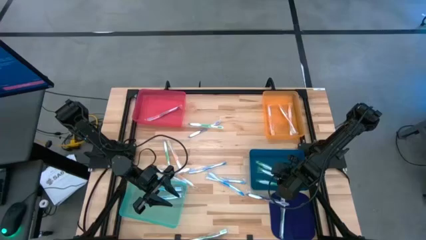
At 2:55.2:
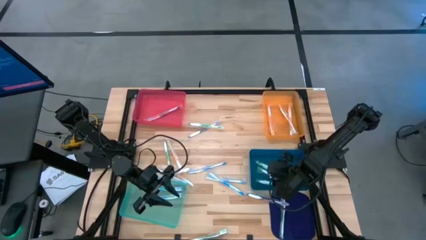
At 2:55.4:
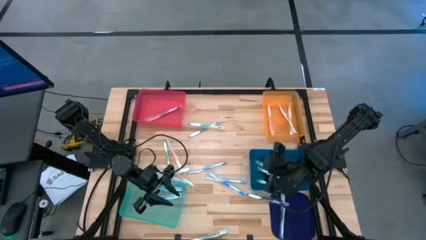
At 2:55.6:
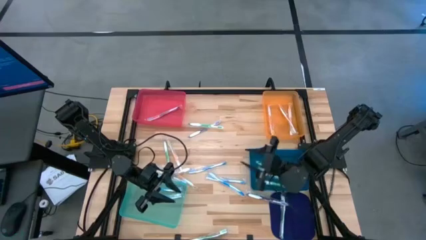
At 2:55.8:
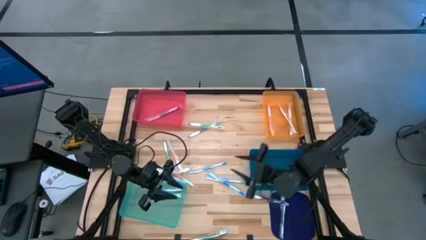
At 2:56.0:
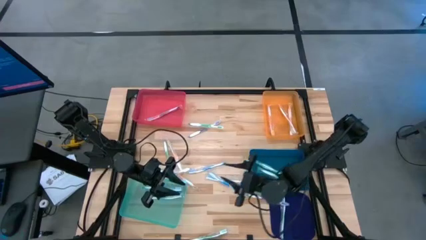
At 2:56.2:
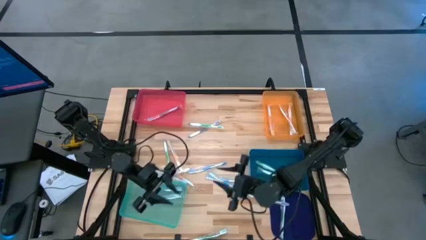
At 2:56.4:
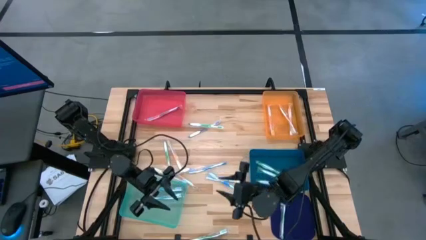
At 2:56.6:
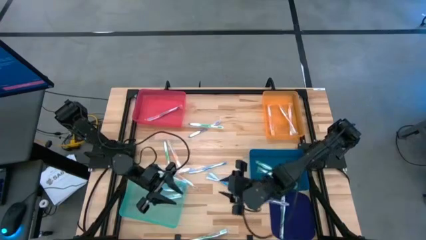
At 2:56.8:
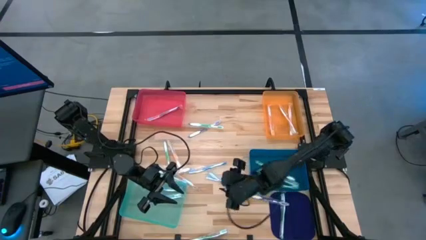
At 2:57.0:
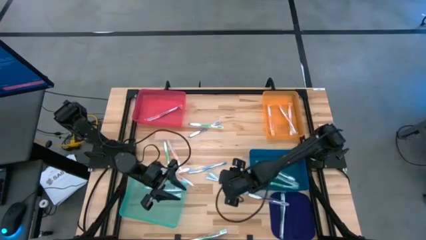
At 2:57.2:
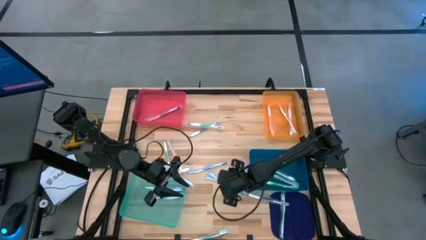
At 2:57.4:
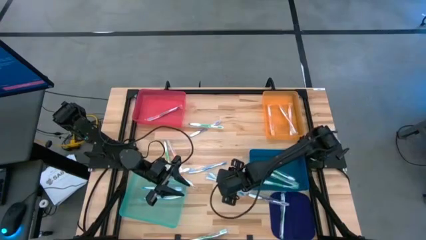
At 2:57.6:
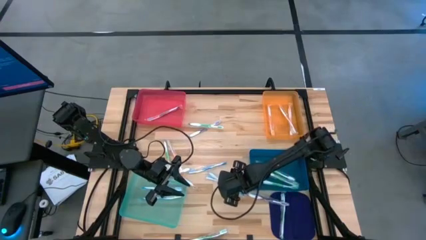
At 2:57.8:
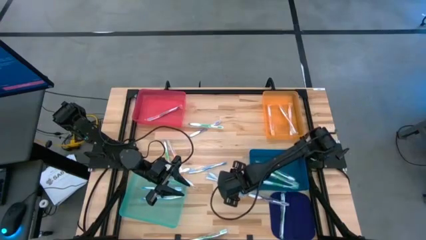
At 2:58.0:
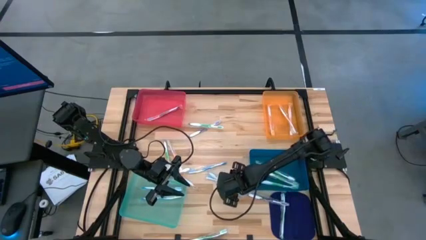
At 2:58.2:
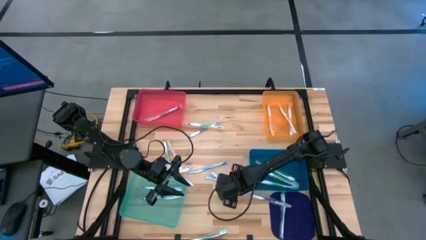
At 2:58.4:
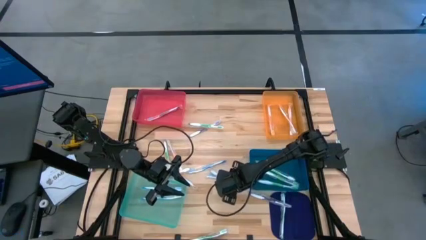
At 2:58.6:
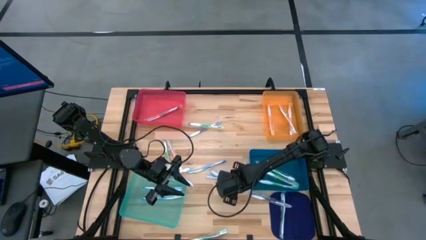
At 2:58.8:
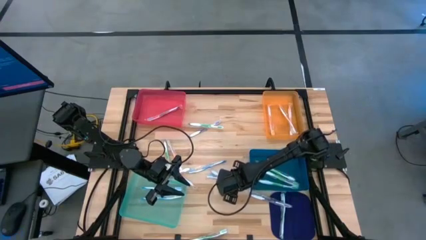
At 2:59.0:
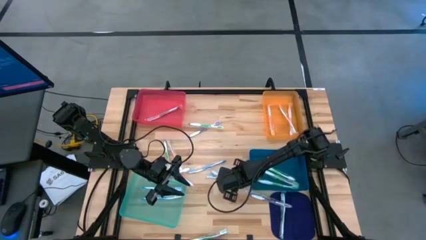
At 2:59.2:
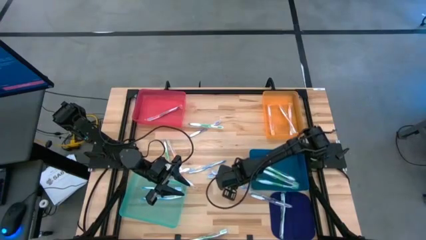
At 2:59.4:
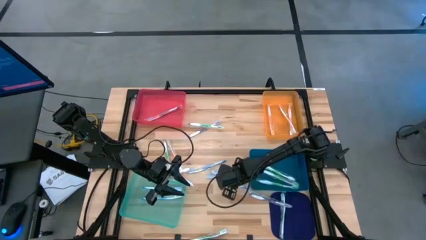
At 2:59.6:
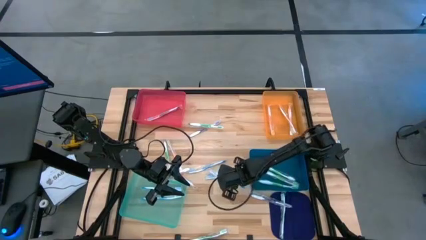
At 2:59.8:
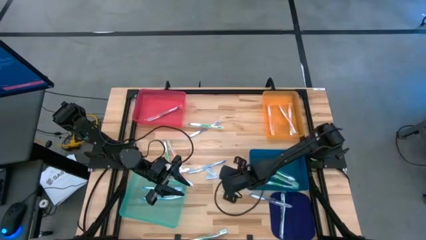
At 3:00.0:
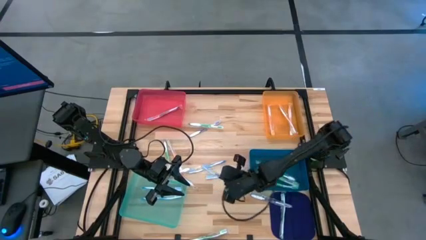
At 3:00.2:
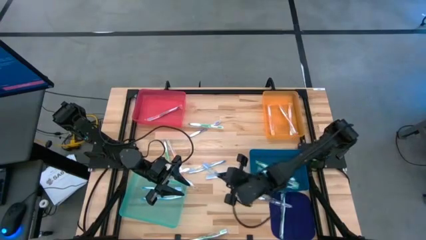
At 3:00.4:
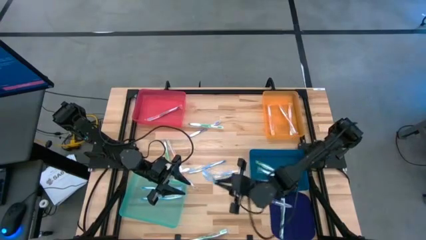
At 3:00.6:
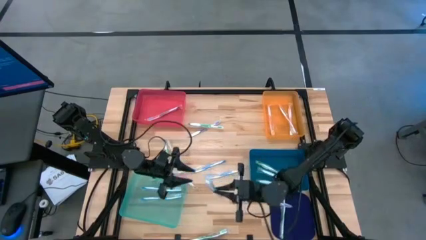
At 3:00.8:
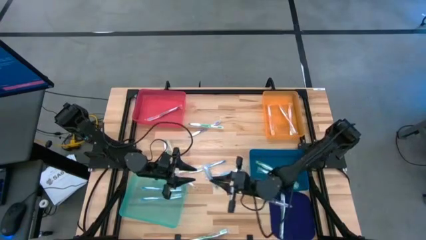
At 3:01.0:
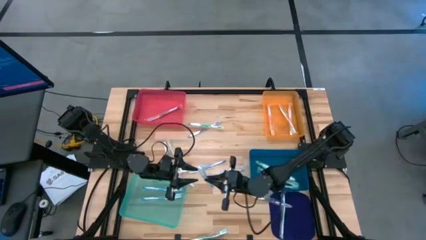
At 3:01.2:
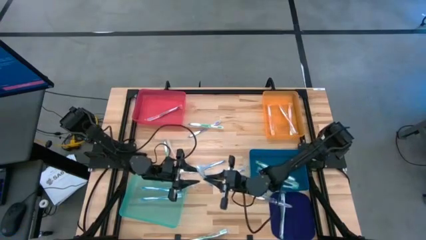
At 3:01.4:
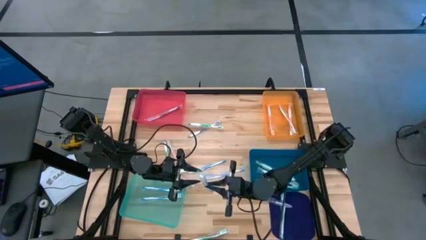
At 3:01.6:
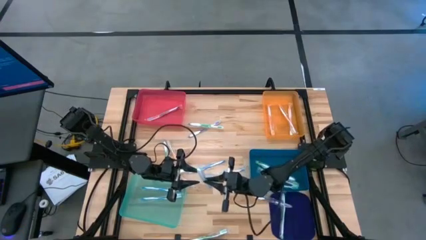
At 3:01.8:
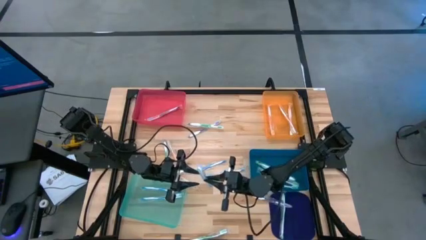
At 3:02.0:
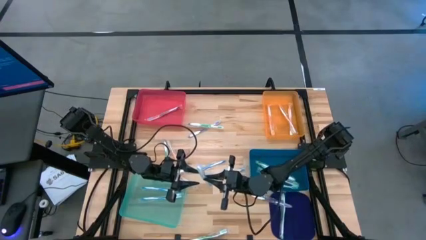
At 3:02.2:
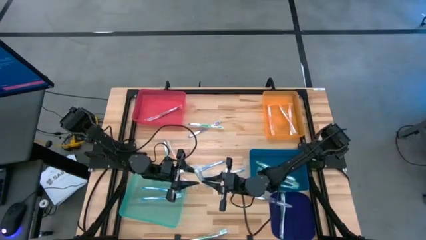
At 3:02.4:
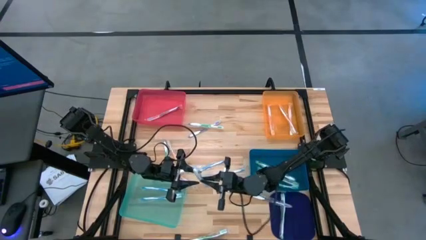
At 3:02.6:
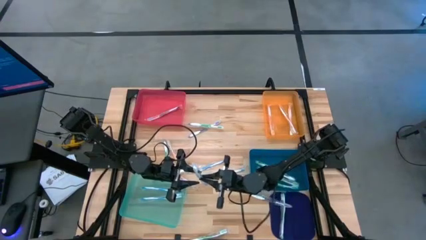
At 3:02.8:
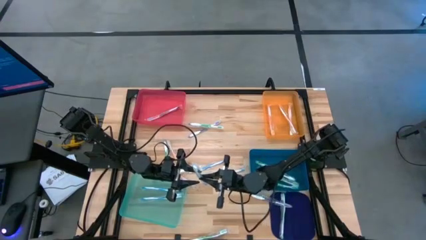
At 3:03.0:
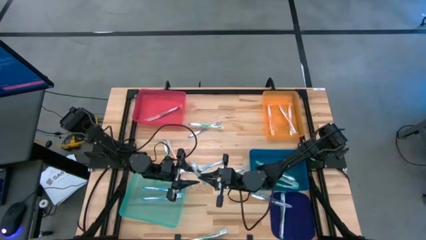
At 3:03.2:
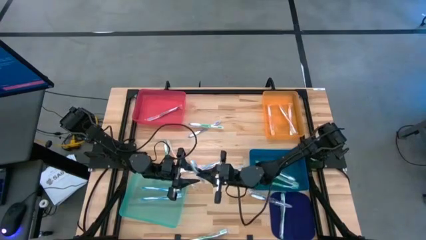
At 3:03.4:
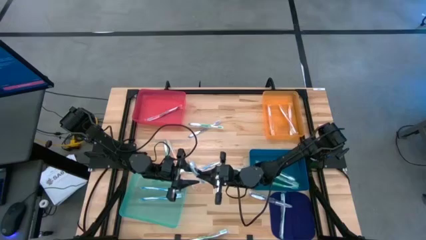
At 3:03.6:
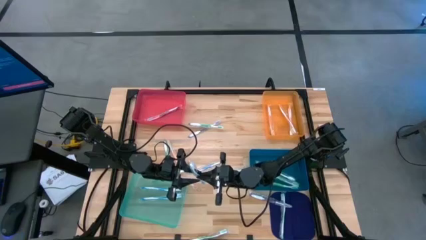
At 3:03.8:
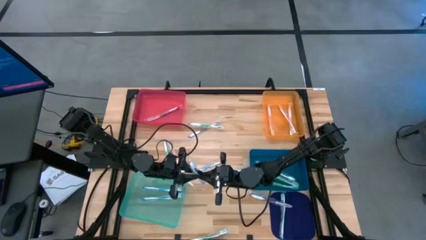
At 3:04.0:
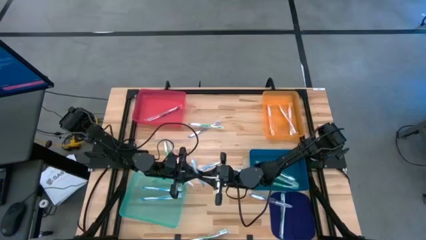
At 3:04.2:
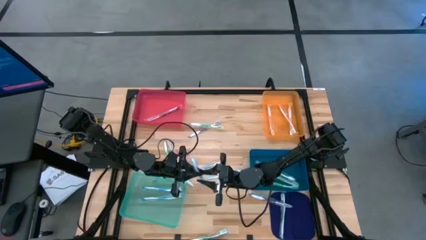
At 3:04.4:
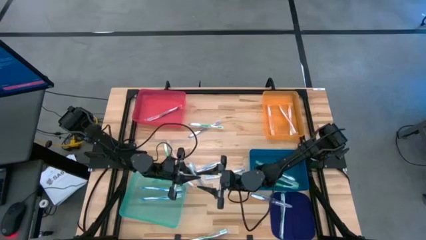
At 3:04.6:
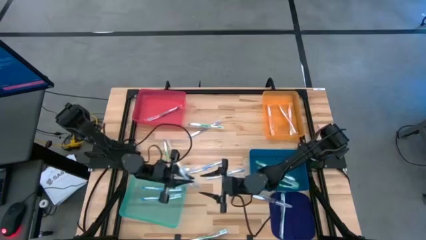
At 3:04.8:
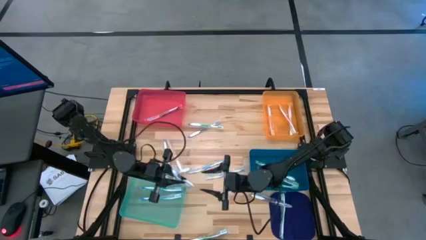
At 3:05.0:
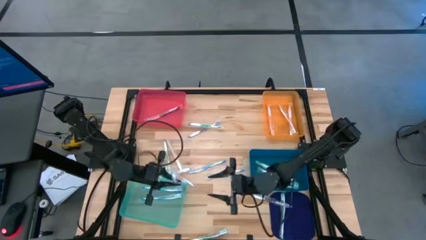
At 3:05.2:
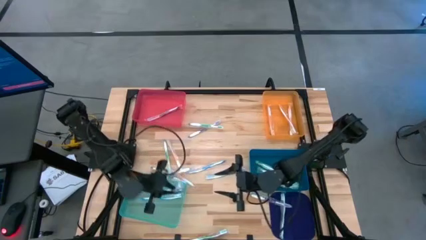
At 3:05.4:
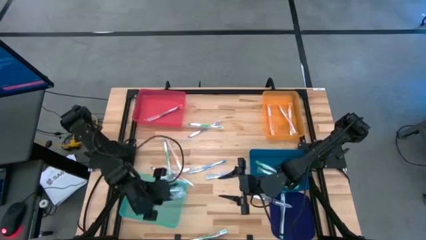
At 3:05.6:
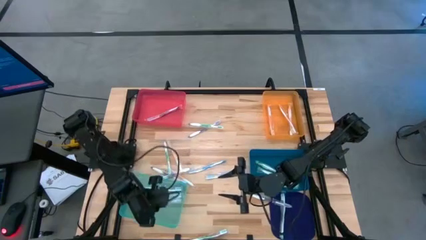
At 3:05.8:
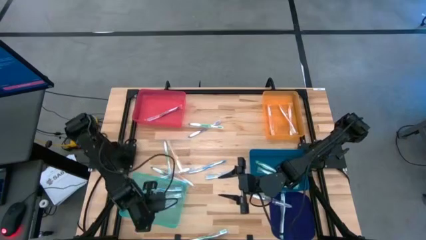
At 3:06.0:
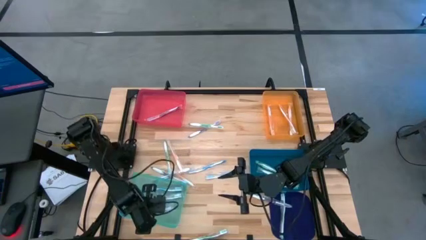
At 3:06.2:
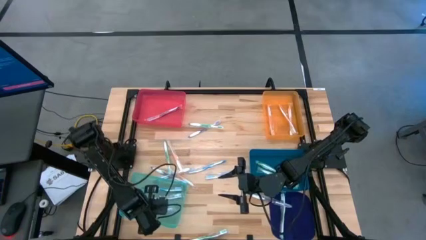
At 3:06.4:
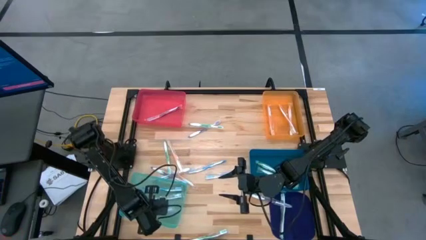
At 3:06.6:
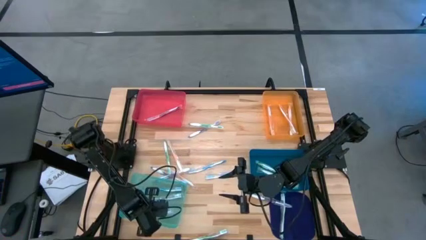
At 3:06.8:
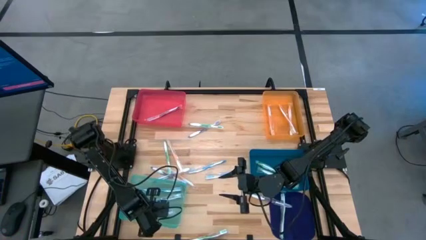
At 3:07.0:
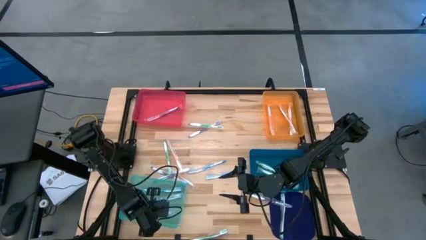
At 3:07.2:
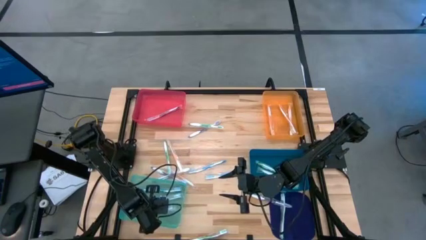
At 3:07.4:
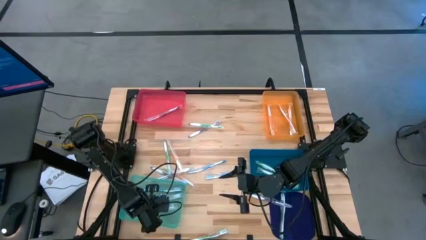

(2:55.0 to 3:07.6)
Task: Pick & Place Toothbrushes
Put the blue toothbrush into the green bin
